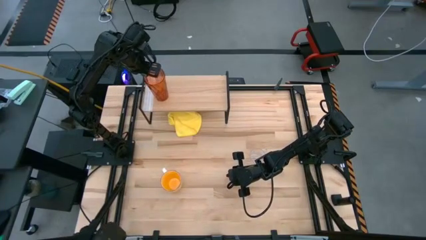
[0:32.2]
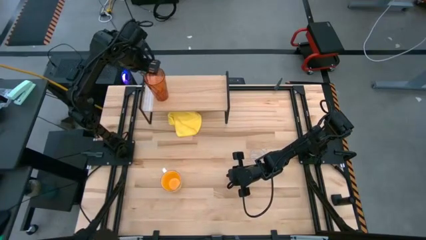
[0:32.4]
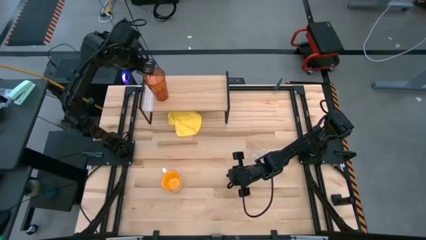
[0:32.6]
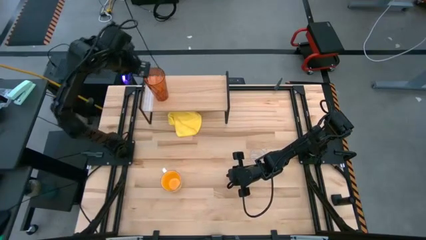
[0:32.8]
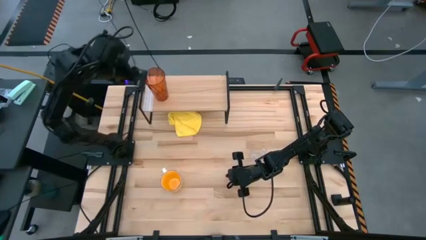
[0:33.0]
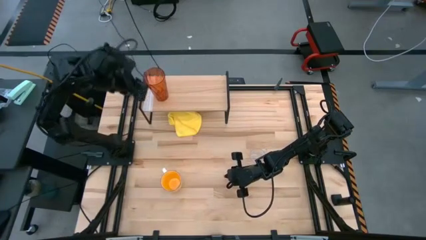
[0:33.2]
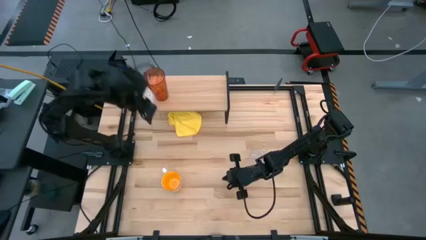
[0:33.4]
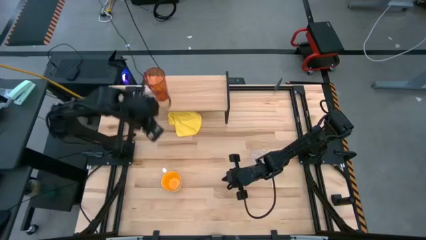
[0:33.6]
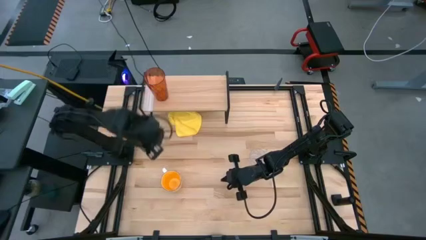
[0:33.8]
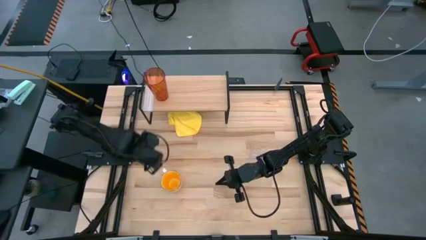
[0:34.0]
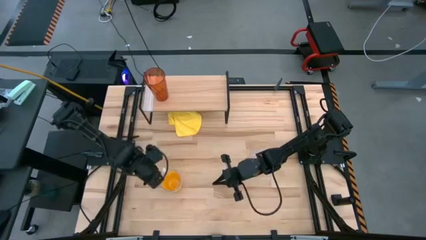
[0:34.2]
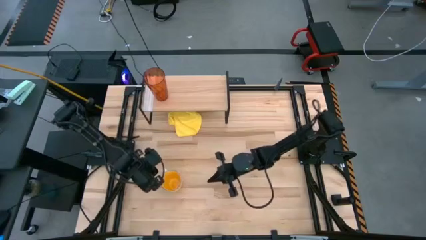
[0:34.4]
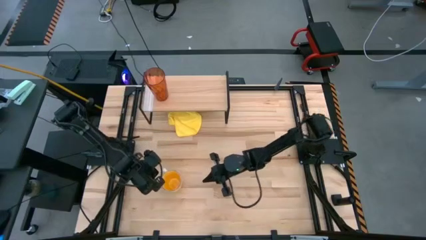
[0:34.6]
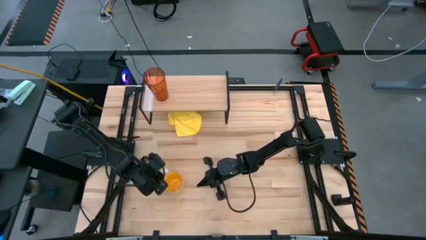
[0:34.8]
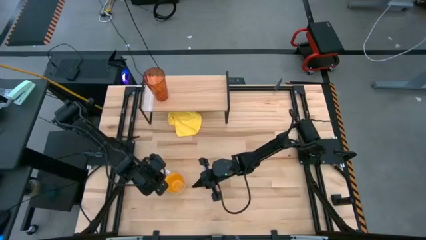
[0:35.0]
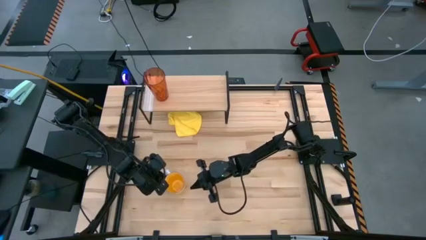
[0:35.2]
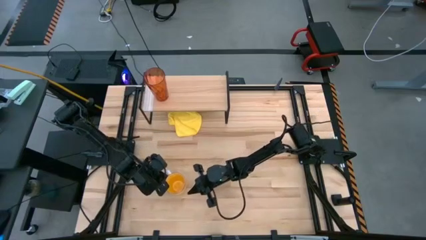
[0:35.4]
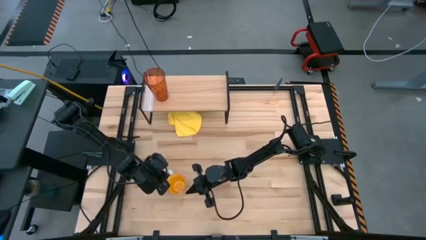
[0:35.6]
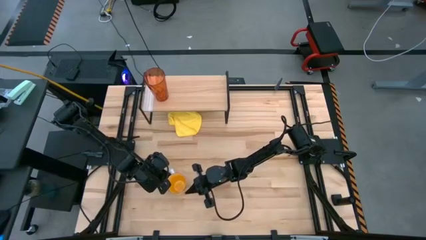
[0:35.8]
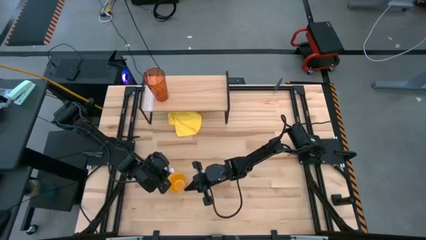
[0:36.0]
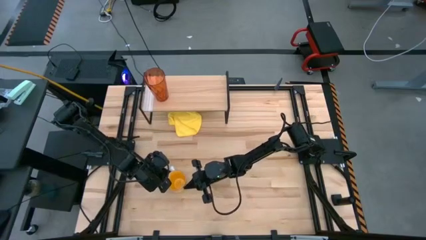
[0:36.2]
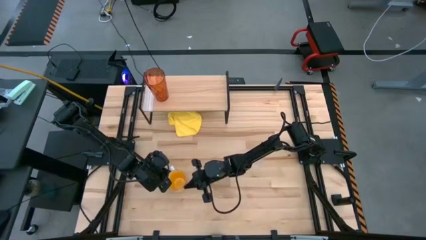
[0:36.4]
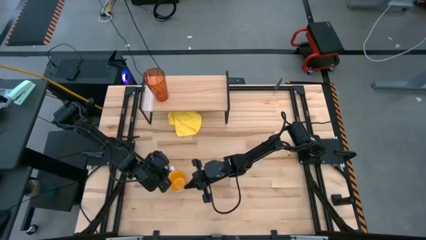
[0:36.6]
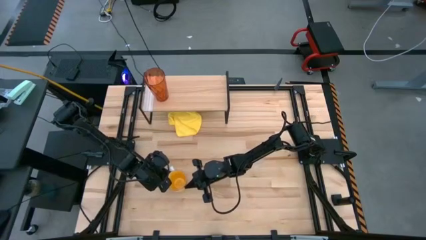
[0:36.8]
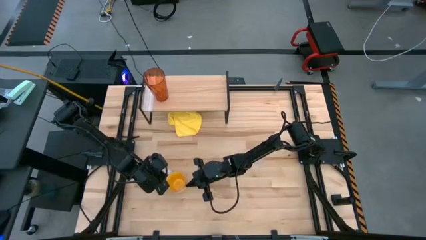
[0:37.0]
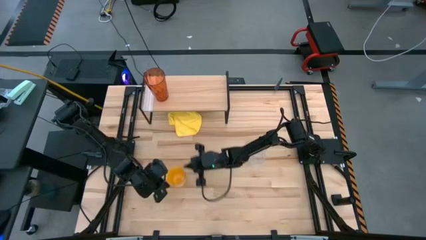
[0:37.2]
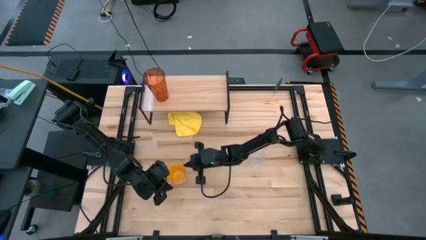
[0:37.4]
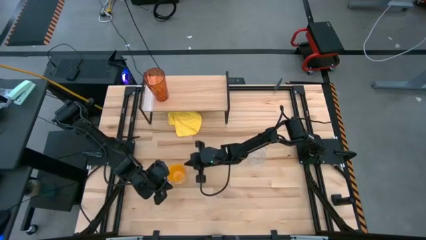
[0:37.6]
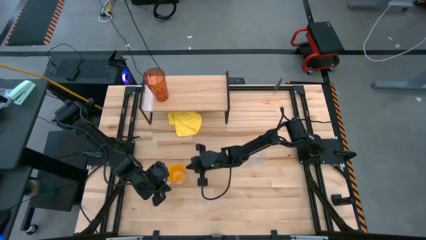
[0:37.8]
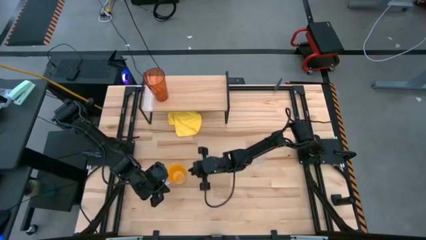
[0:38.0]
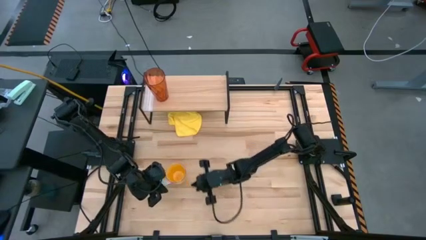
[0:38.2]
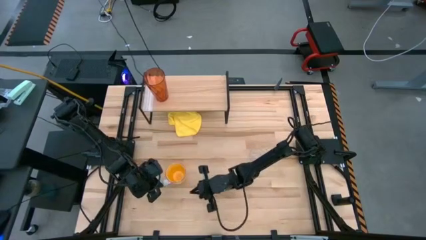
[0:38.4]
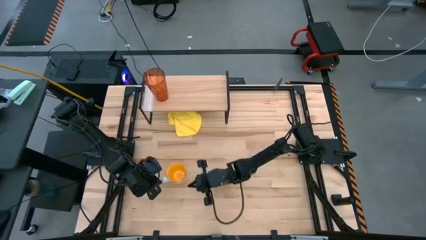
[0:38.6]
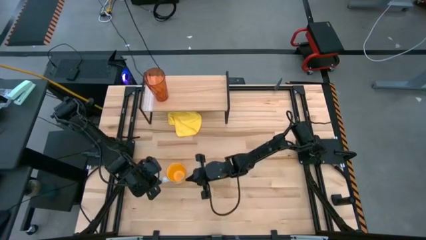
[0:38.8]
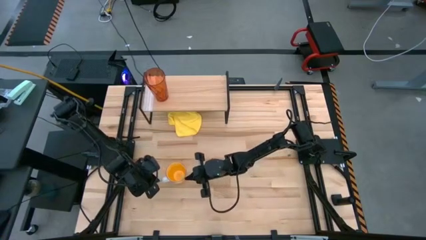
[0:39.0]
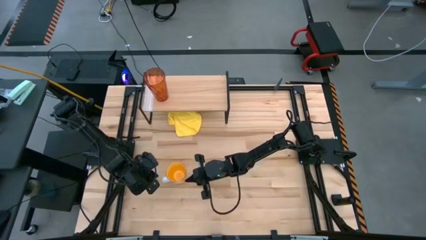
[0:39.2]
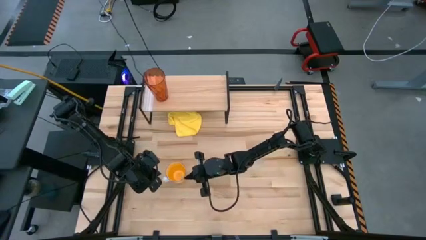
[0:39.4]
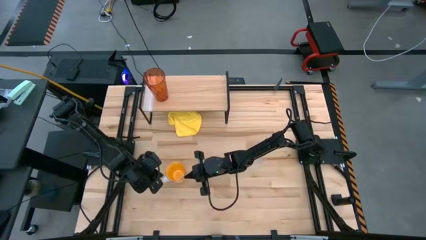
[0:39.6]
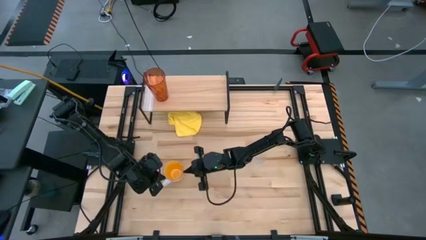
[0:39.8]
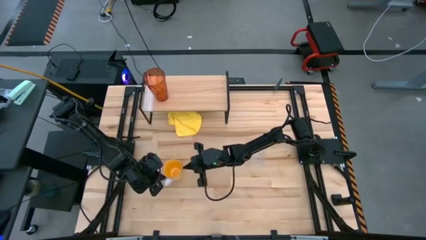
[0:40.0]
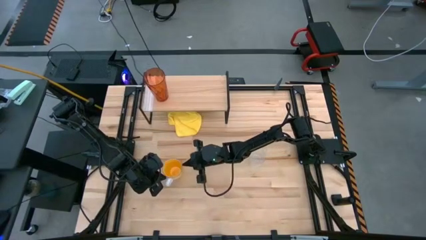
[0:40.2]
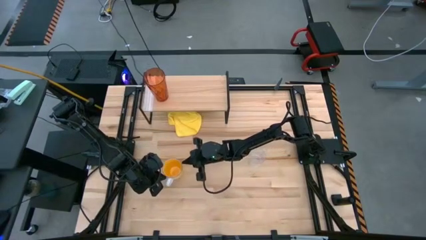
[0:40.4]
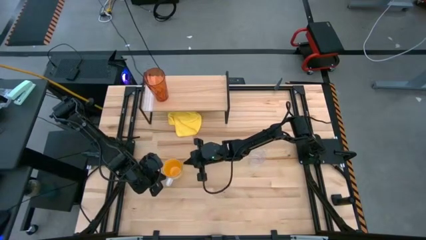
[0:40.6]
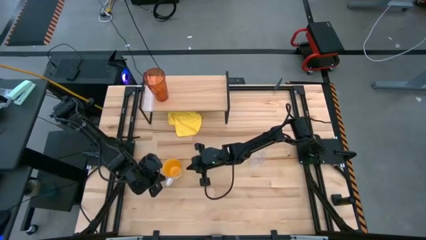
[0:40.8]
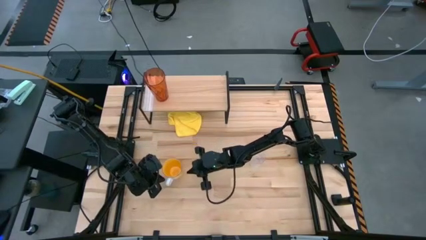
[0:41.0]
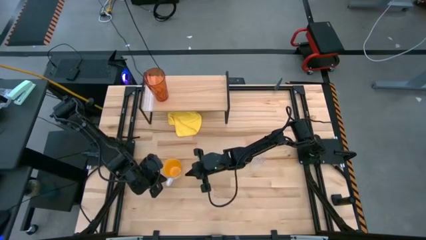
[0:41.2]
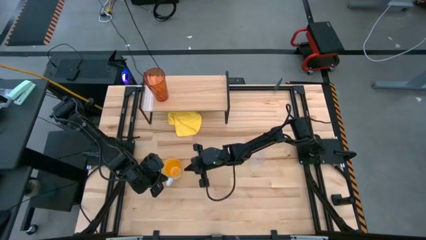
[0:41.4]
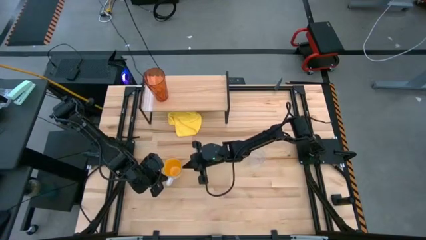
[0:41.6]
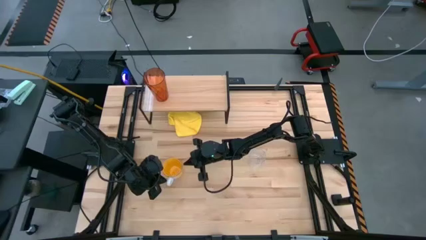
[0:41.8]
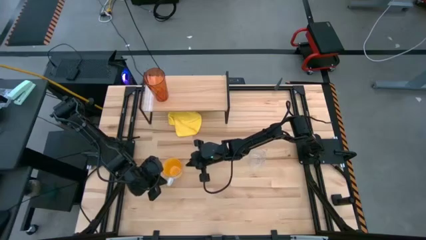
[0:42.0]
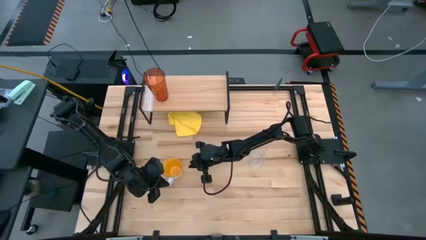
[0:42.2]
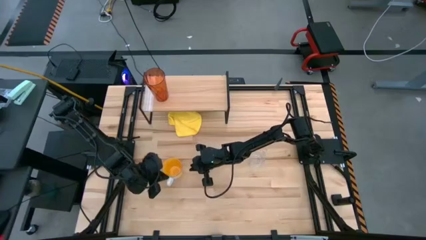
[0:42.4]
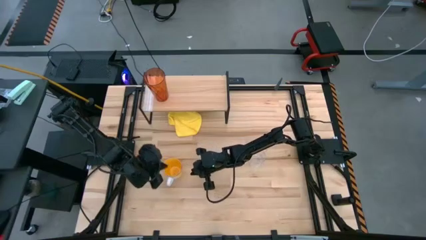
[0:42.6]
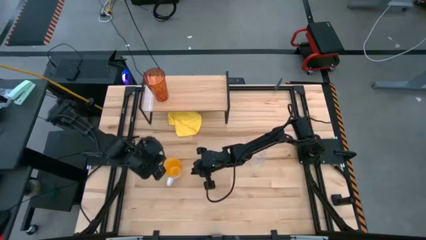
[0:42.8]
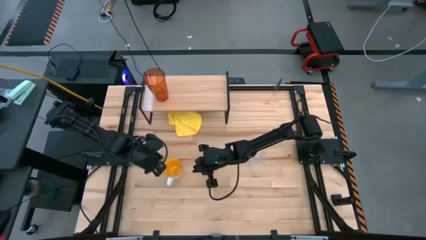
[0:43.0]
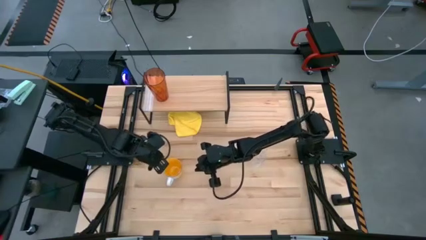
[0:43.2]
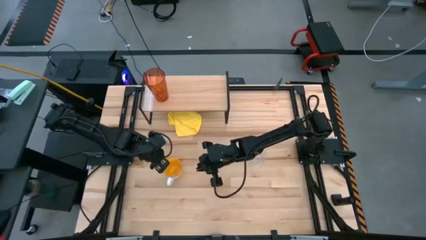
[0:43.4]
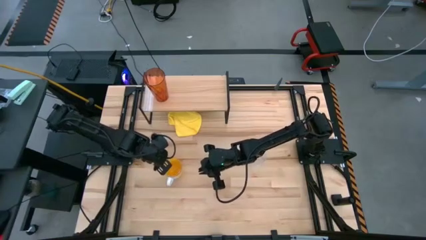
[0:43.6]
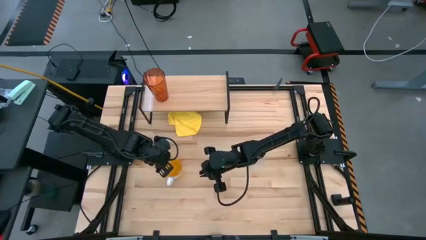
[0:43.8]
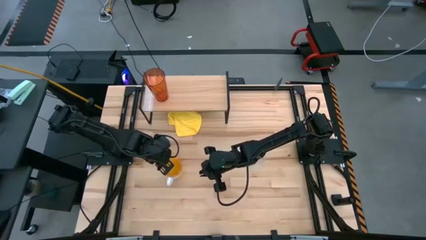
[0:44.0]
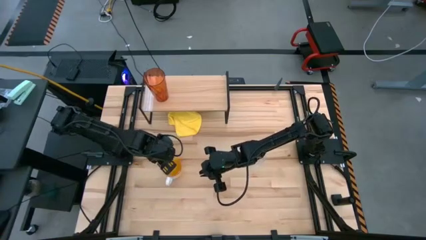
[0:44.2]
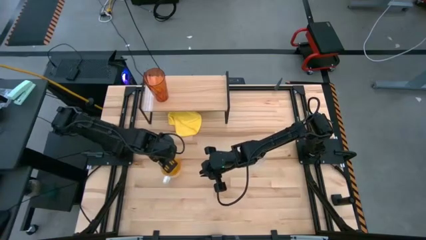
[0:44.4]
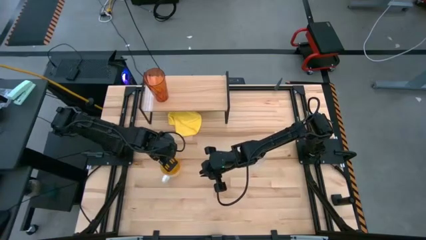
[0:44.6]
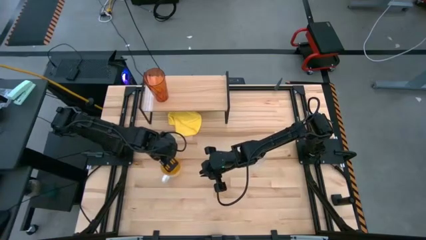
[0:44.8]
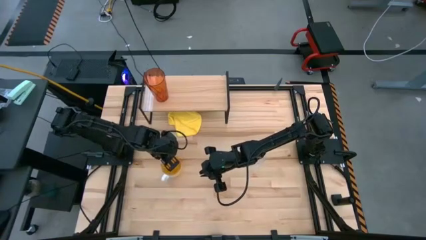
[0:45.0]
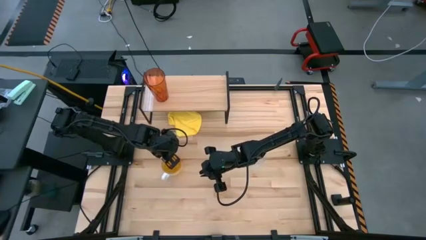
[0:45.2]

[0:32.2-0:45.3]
Task: Stack small to large cups/mugs on shelf
Put the yellow mug on the shelf

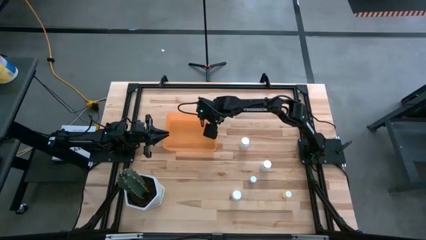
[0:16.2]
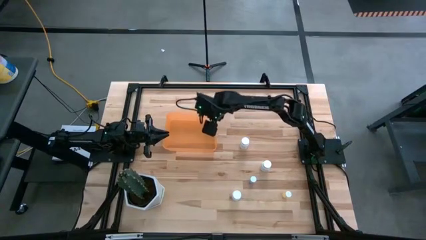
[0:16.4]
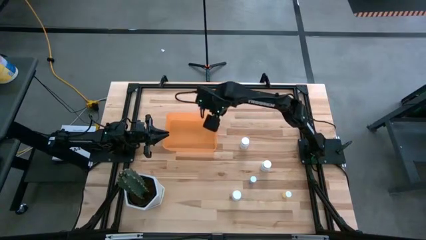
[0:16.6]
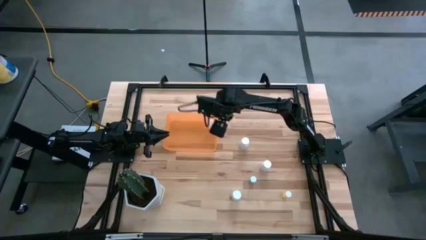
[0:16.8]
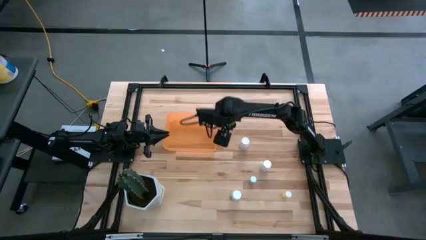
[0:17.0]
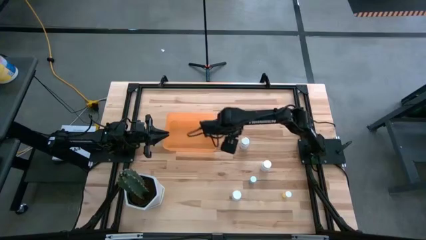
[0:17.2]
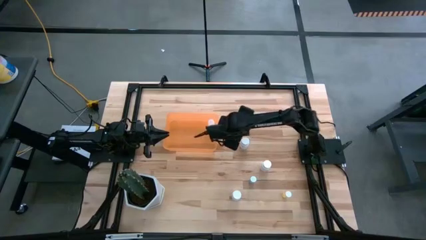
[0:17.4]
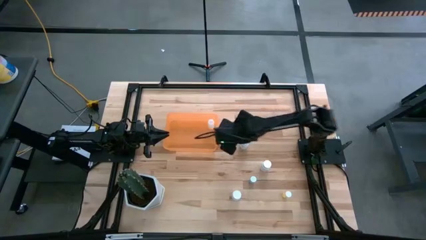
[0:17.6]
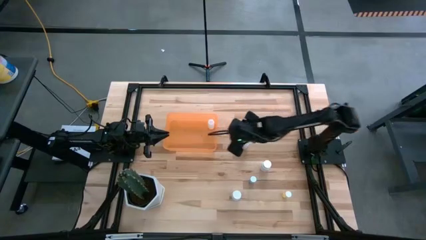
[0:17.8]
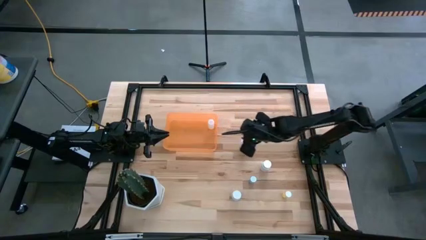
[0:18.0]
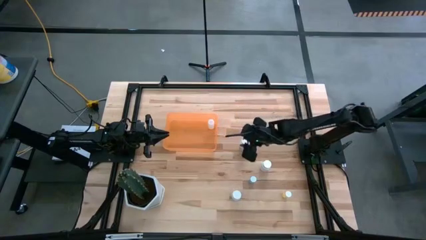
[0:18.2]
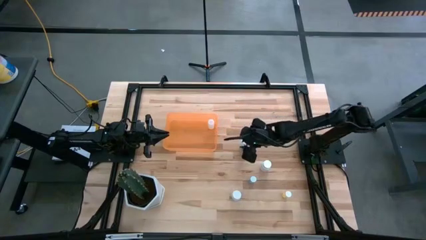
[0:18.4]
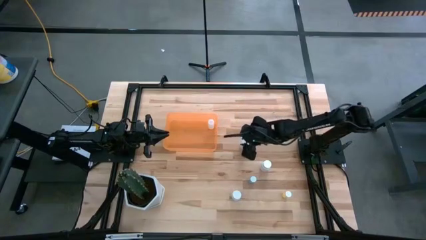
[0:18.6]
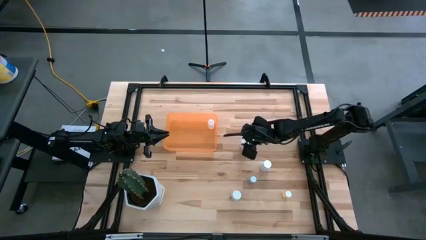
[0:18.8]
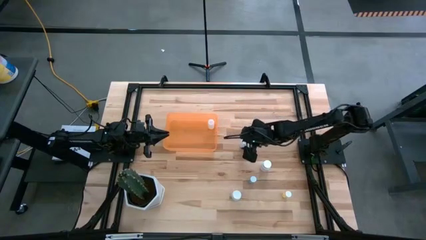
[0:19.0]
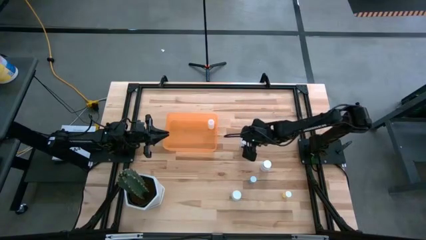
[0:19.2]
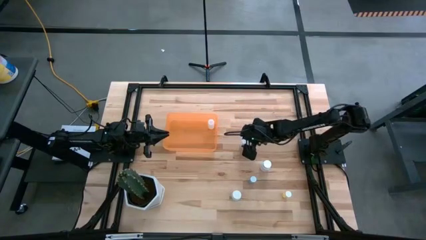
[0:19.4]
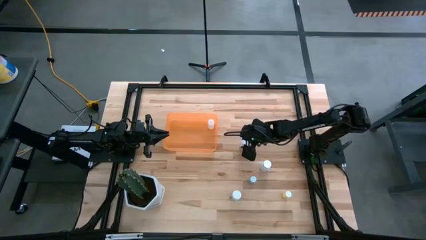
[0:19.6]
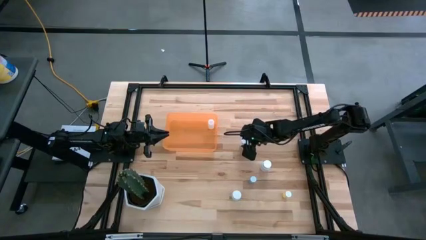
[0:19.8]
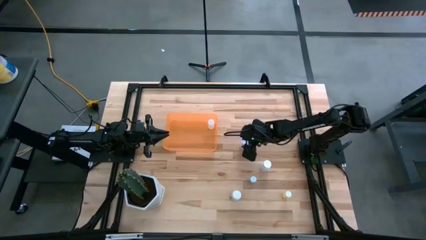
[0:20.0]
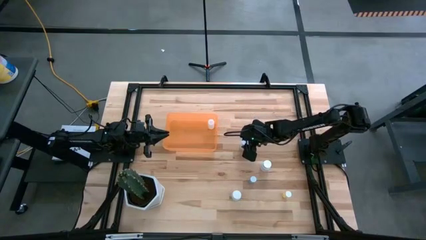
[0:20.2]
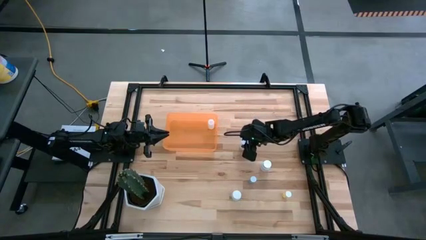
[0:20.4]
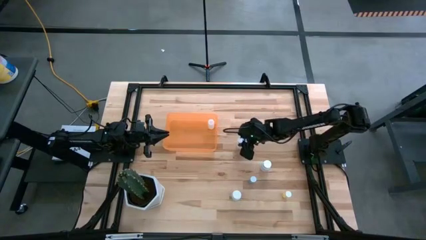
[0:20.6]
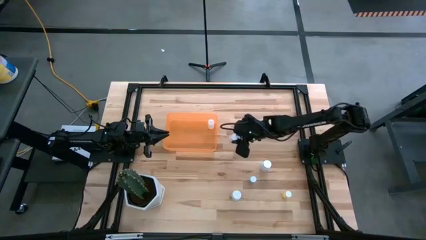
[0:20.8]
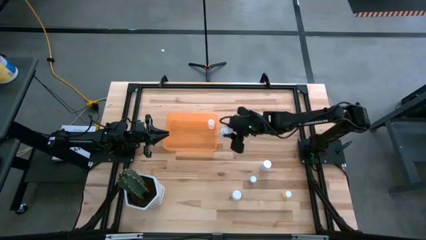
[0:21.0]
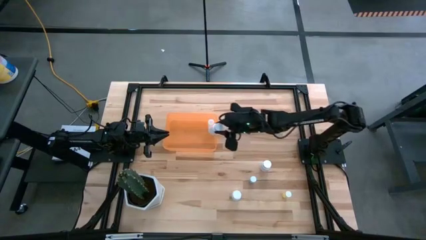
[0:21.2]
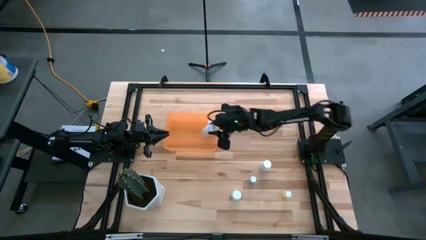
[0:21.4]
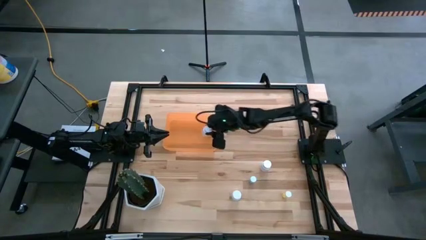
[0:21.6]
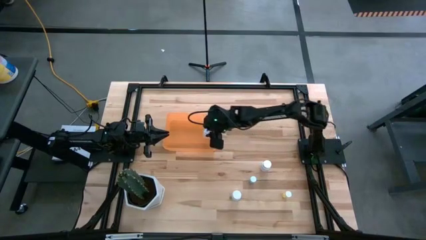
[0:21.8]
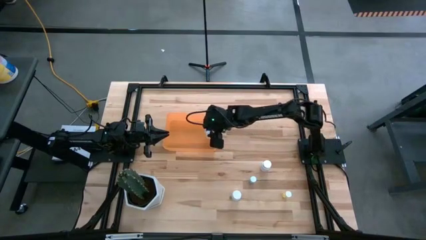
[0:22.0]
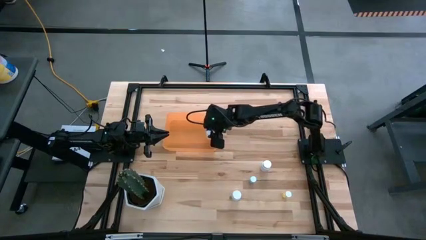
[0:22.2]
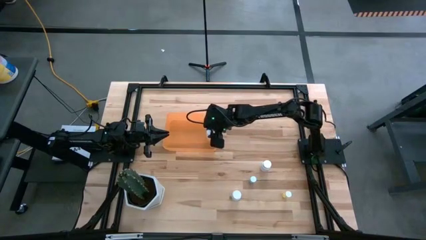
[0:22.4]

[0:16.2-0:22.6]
Task: Pick and place pill bottles into a basket
Put the top white pill bottle in the orange bin
